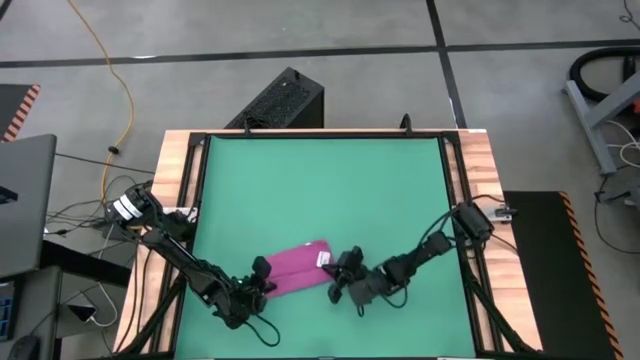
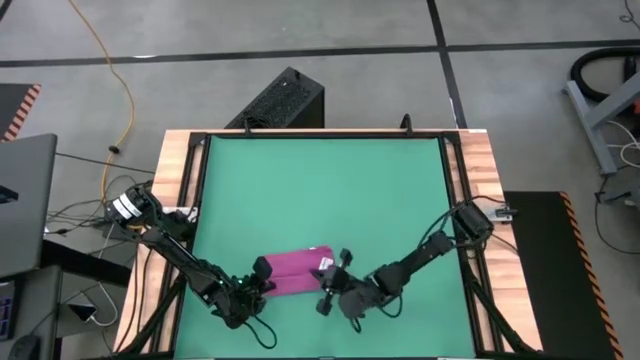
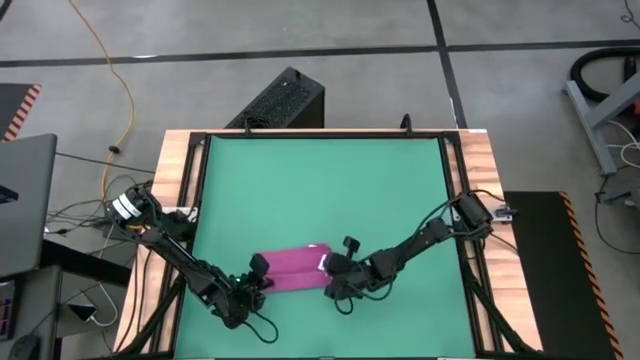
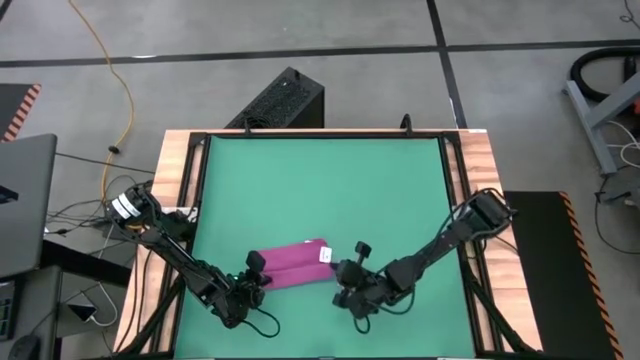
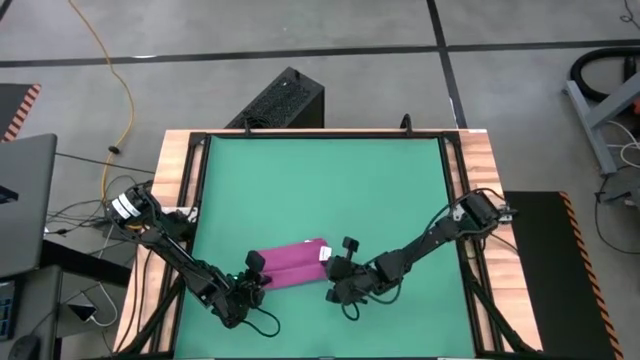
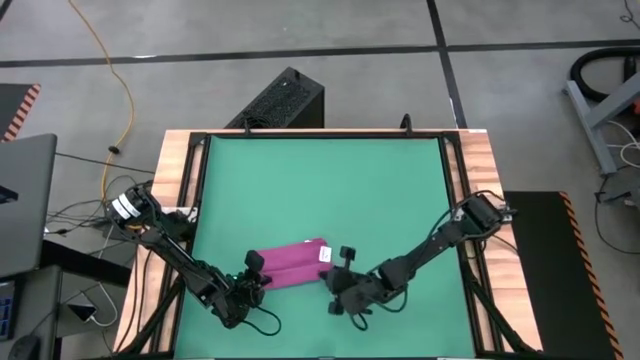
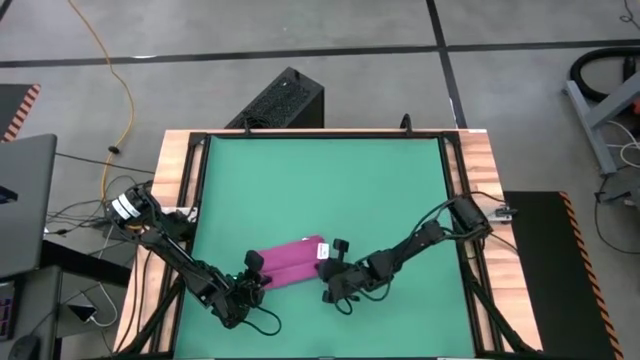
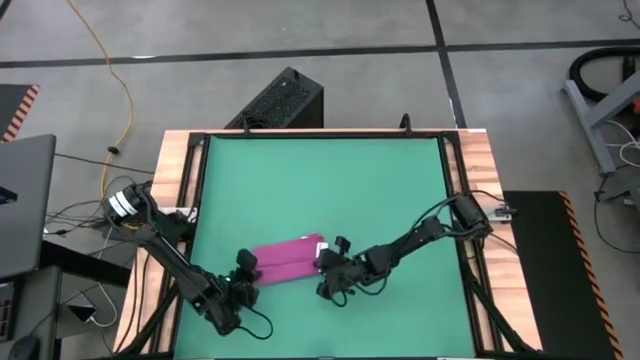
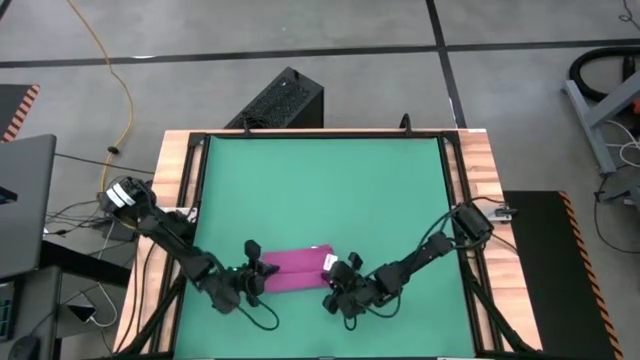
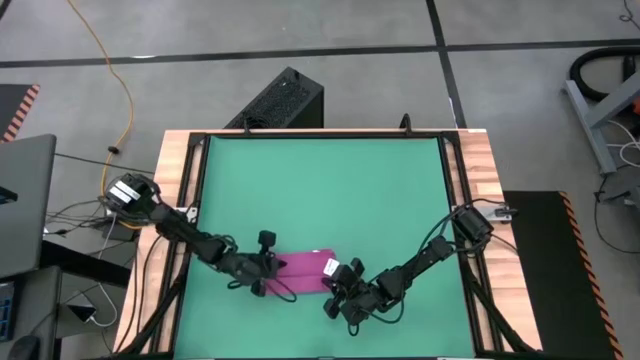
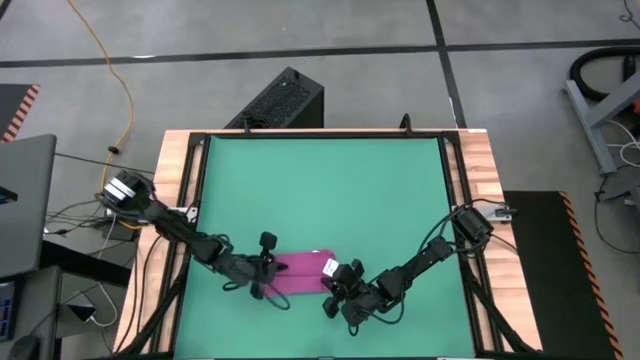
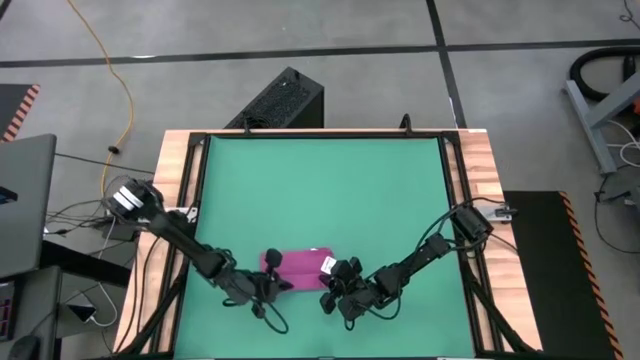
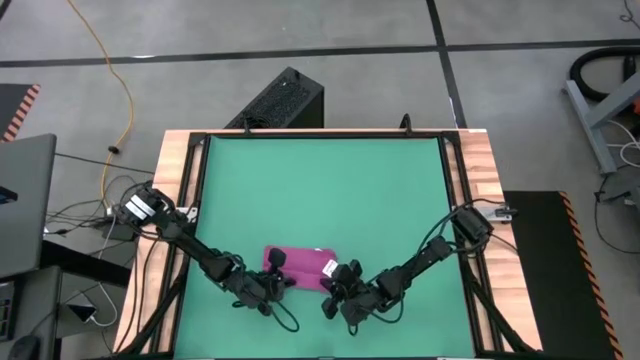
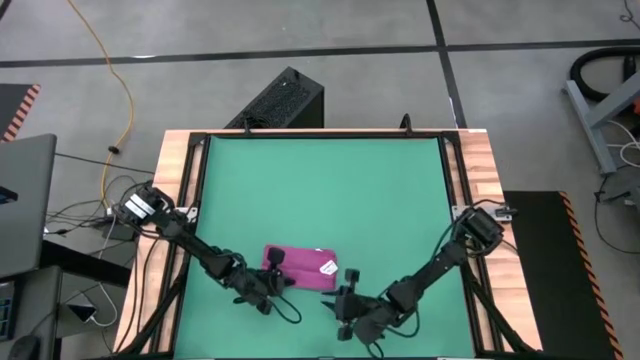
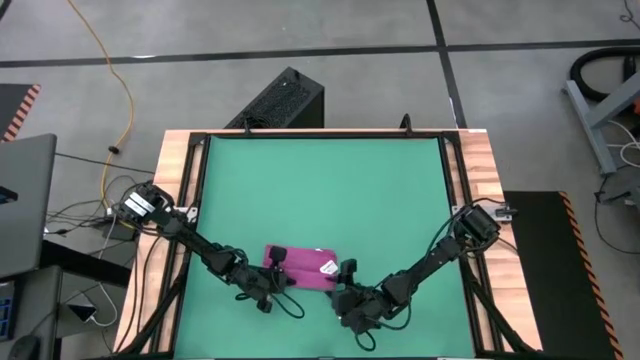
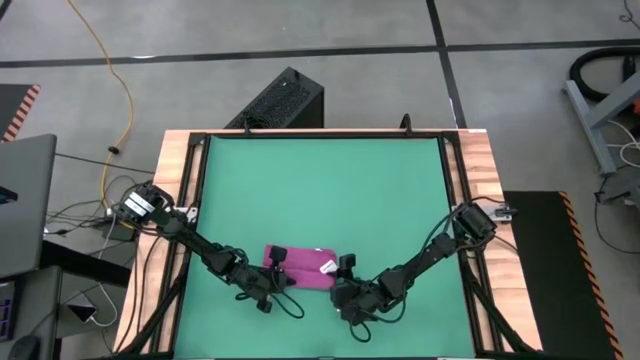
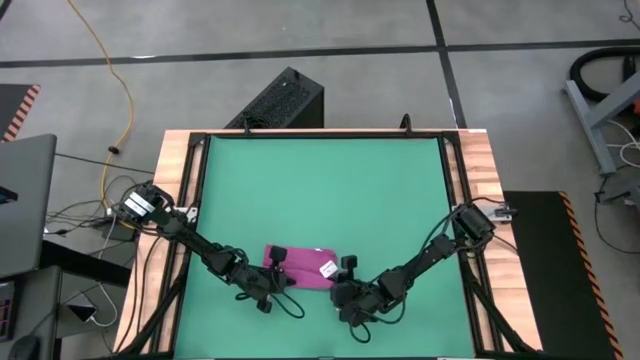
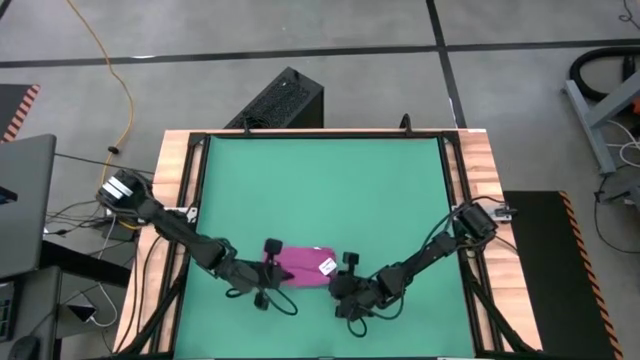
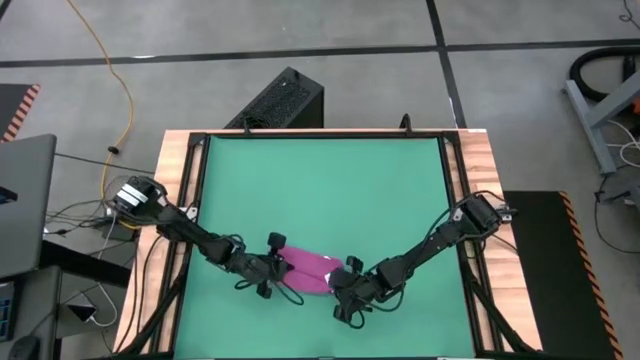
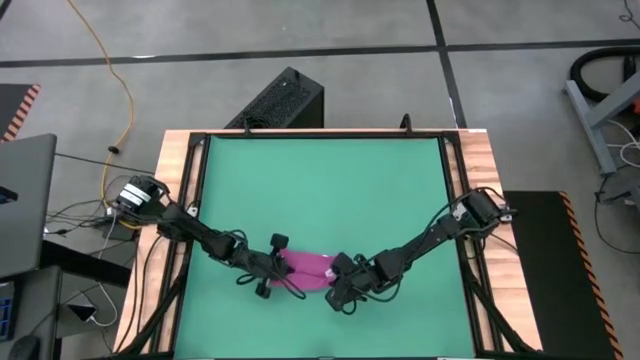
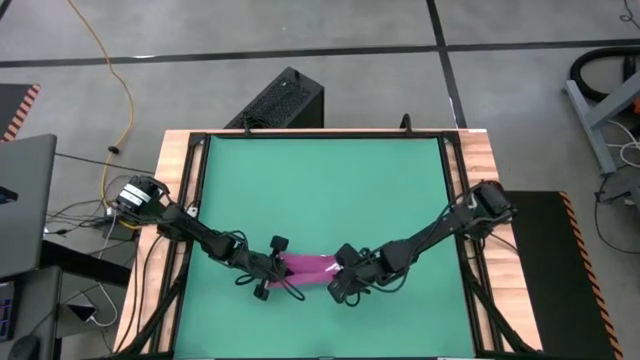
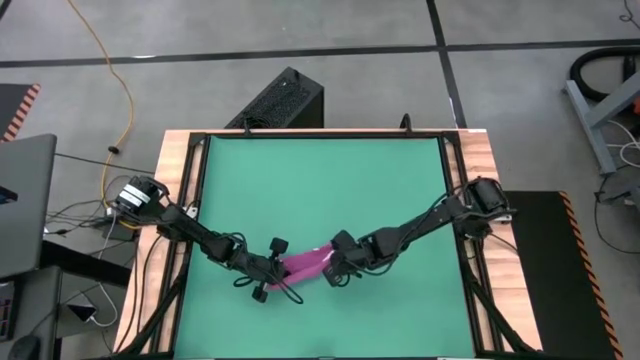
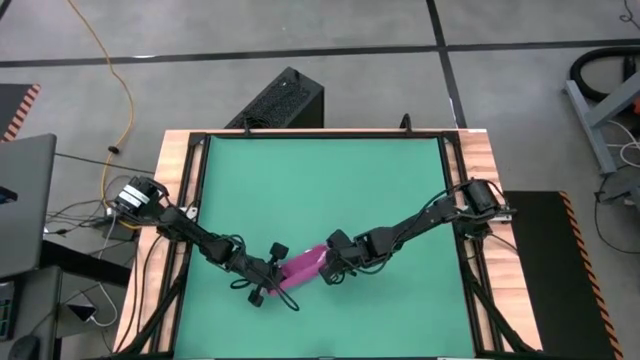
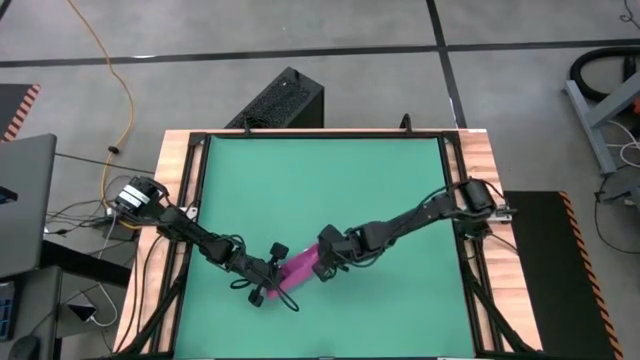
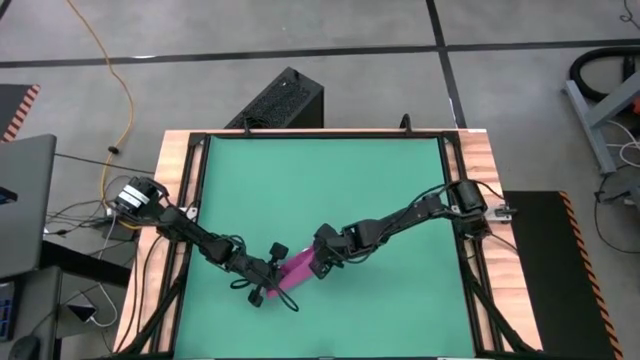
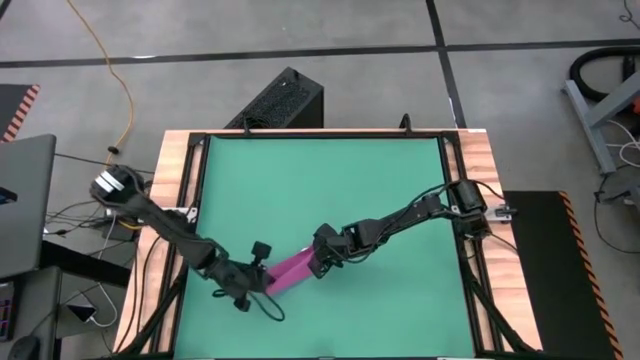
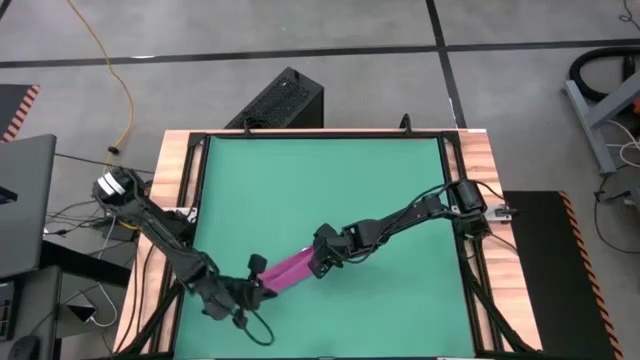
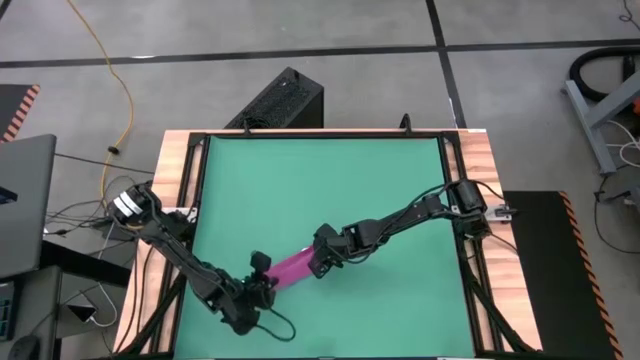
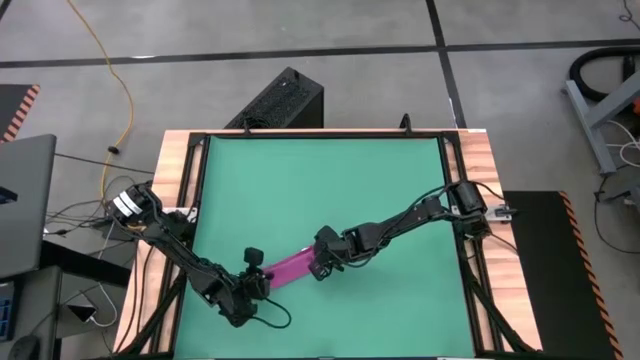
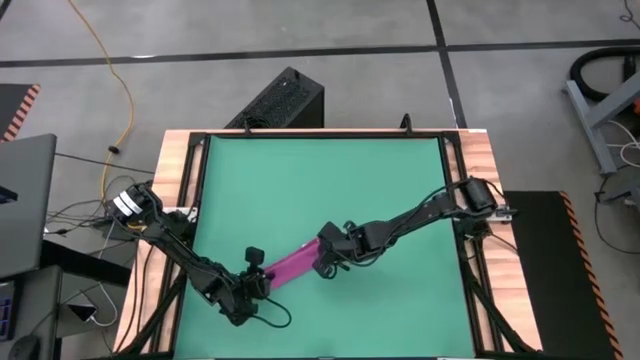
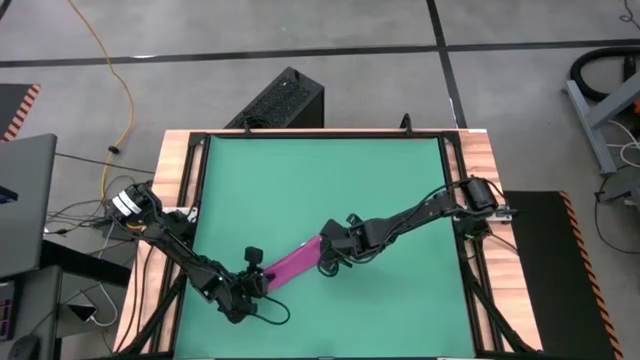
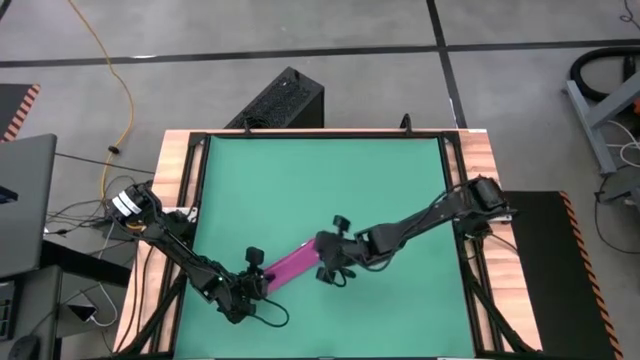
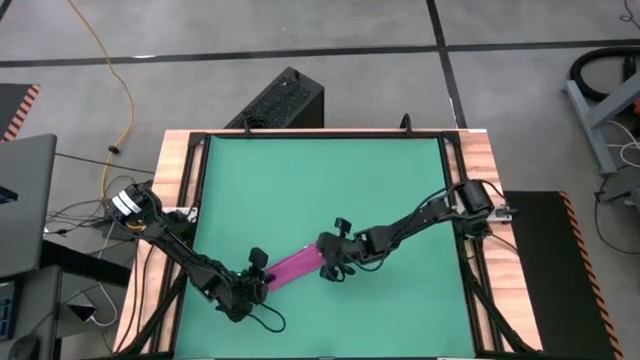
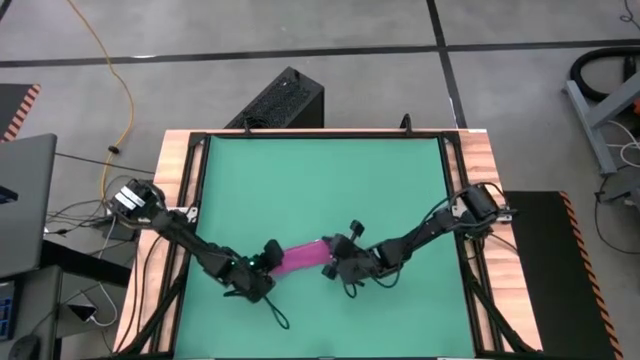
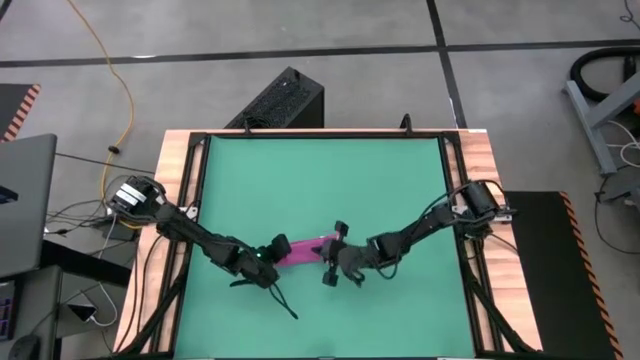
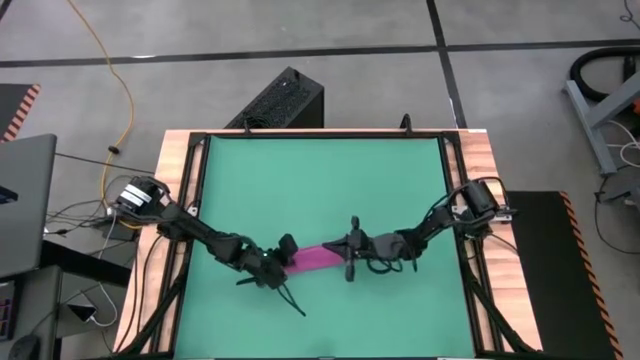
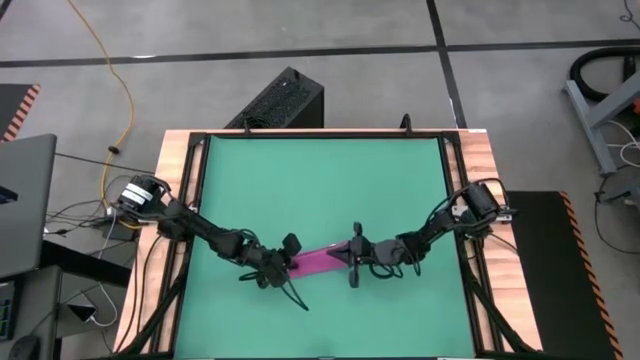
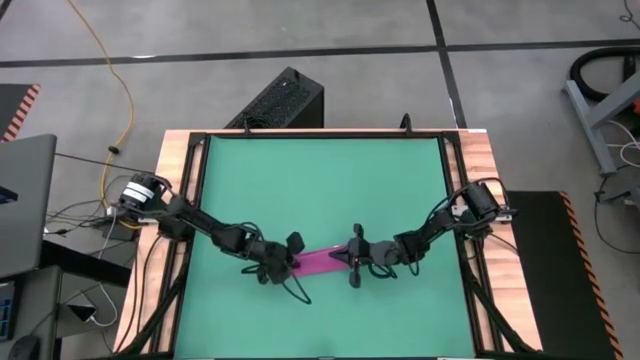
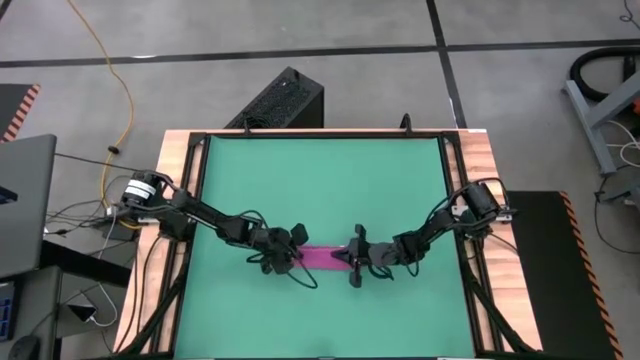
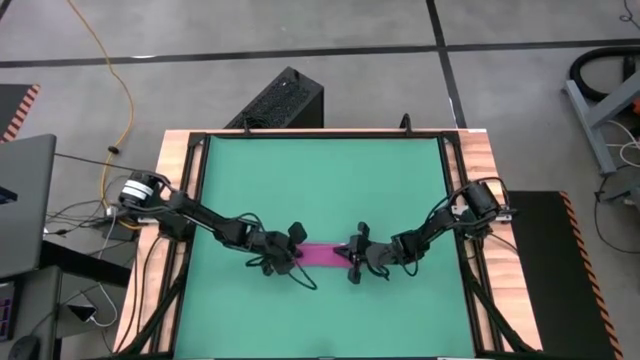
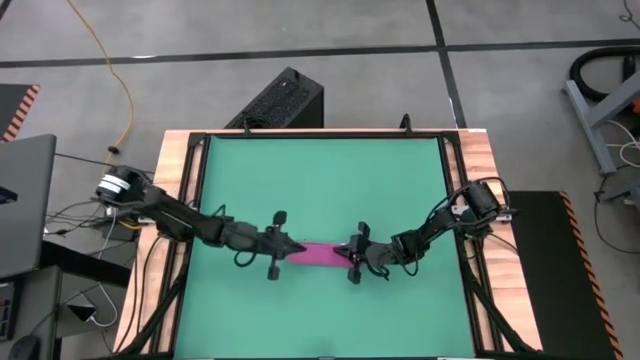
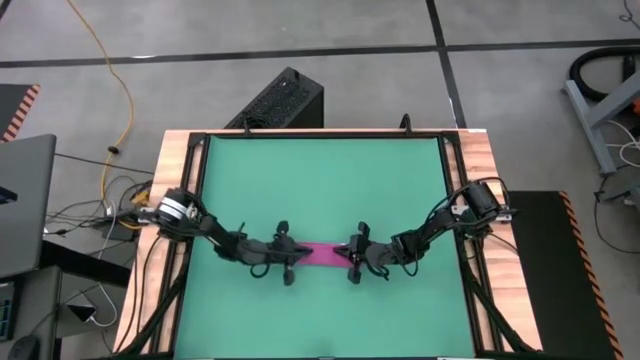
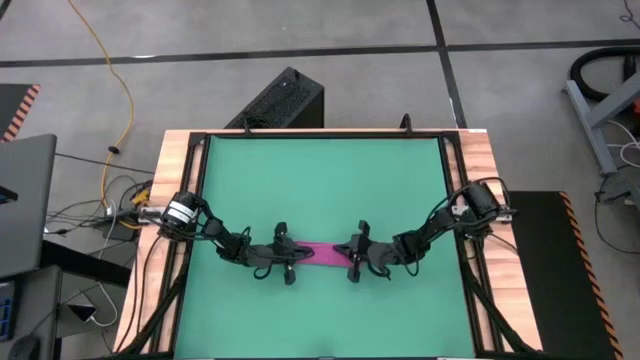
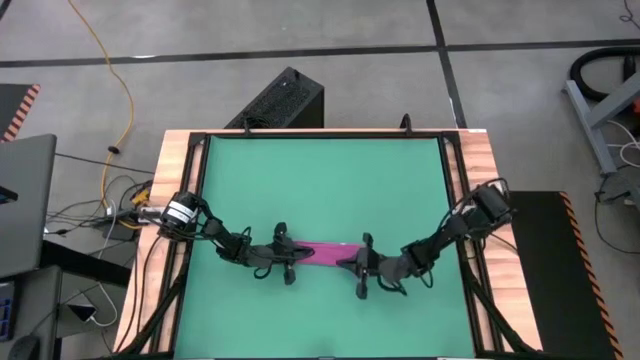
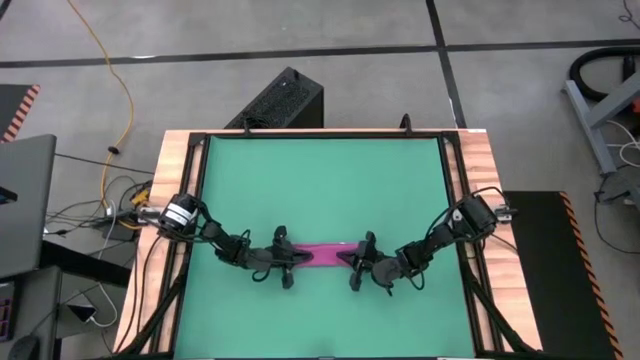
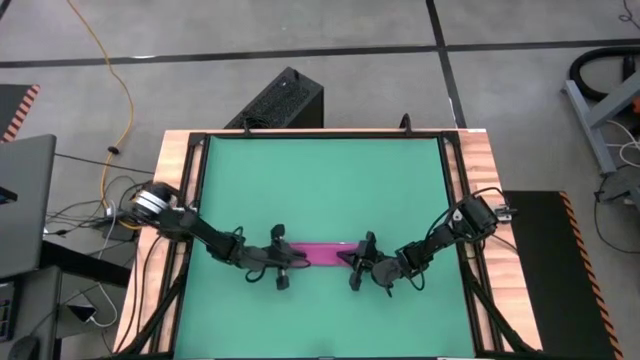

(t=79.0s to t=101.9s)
Task: Roll towel into tight, uniform cylinder
Roll the pink towel
